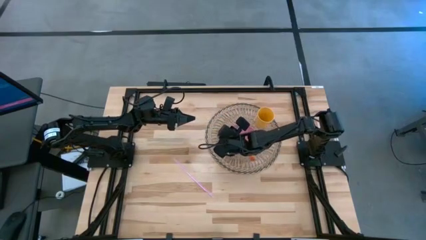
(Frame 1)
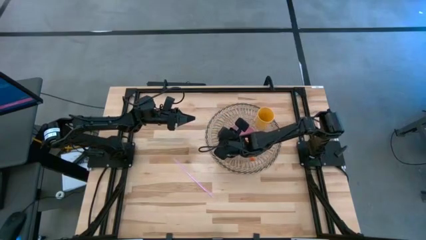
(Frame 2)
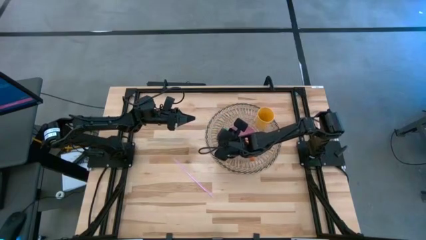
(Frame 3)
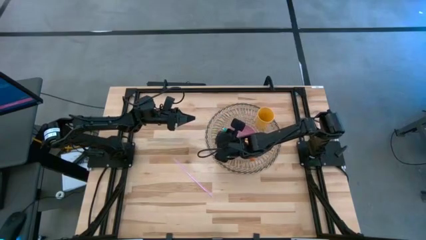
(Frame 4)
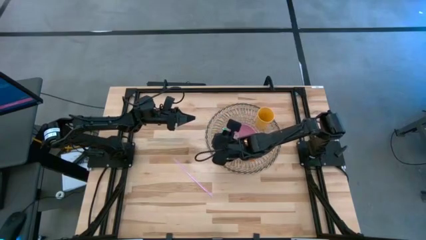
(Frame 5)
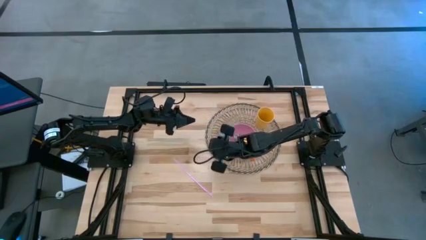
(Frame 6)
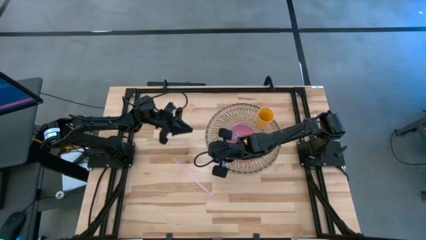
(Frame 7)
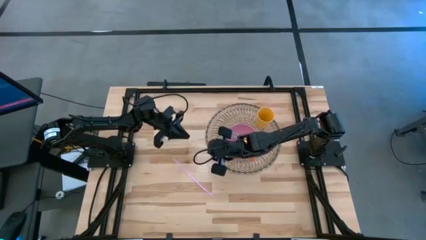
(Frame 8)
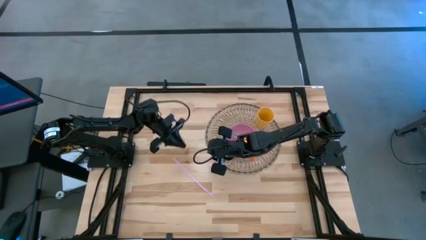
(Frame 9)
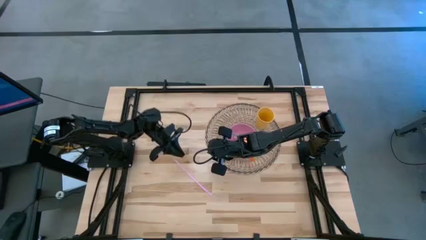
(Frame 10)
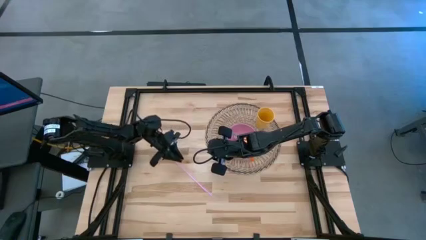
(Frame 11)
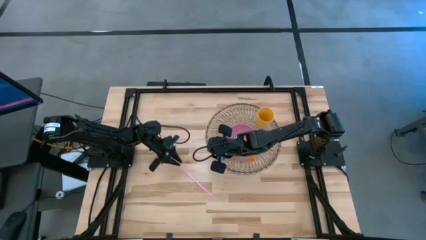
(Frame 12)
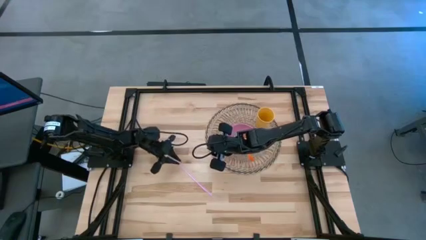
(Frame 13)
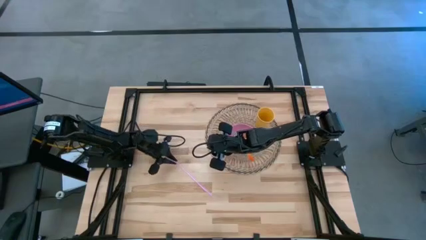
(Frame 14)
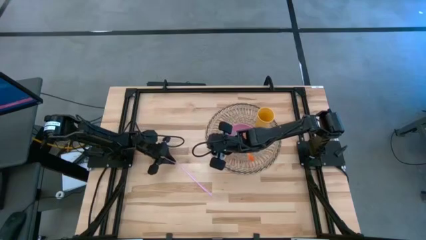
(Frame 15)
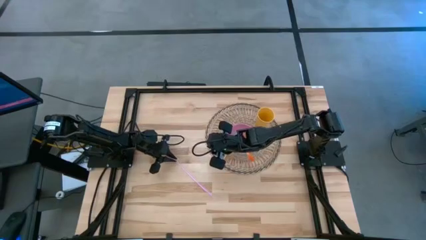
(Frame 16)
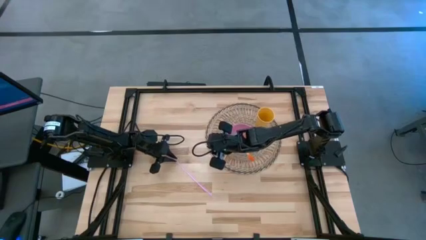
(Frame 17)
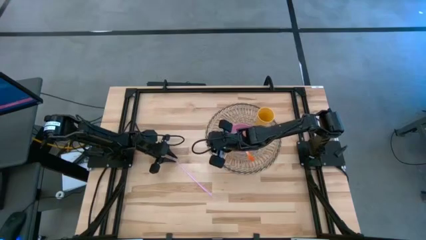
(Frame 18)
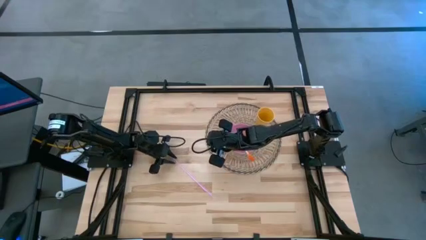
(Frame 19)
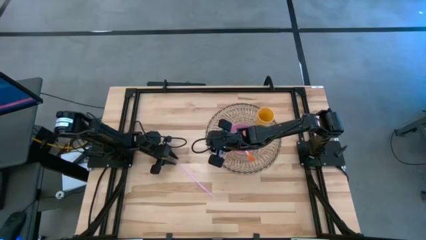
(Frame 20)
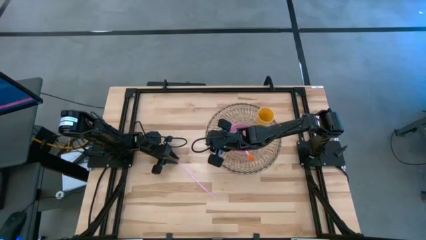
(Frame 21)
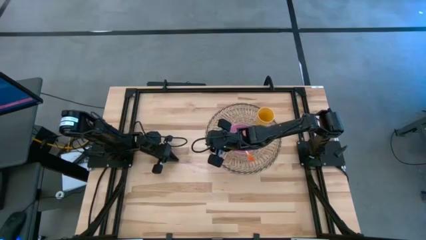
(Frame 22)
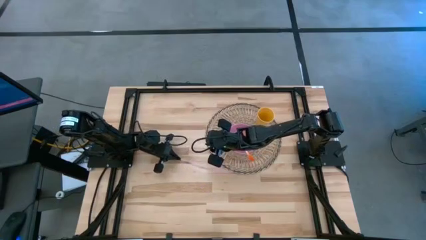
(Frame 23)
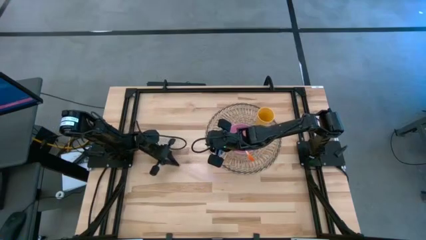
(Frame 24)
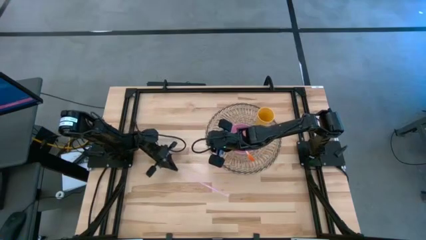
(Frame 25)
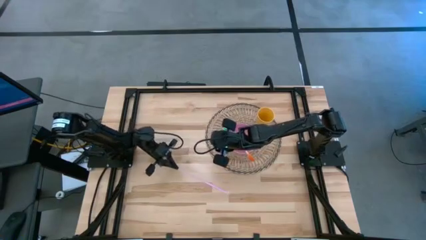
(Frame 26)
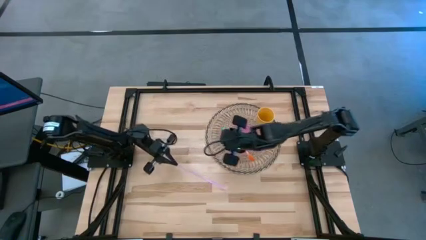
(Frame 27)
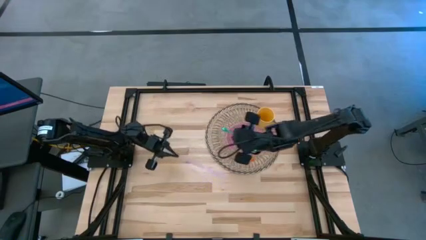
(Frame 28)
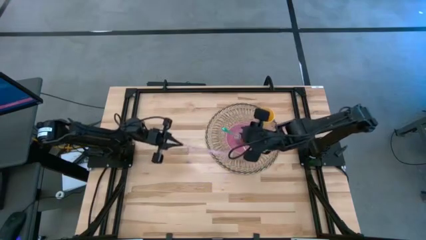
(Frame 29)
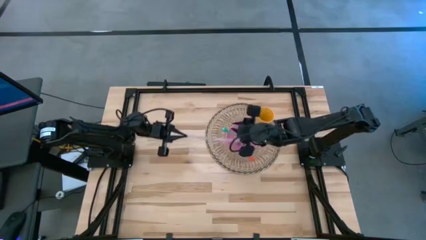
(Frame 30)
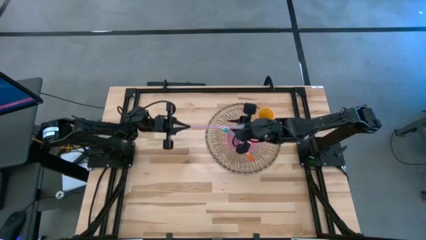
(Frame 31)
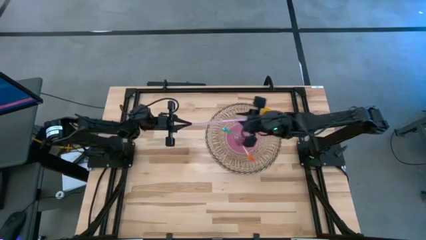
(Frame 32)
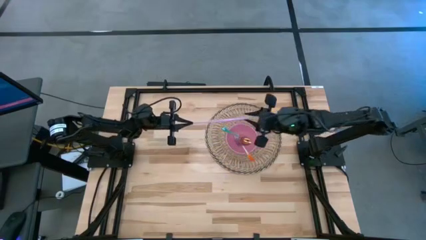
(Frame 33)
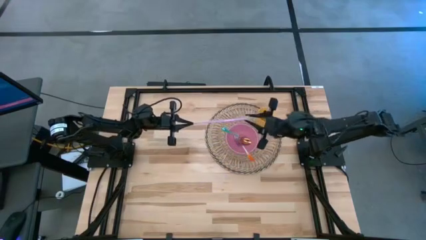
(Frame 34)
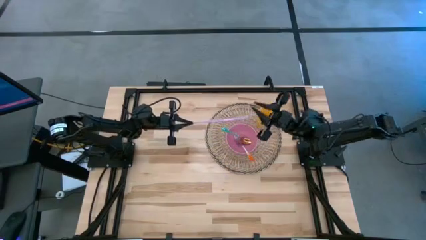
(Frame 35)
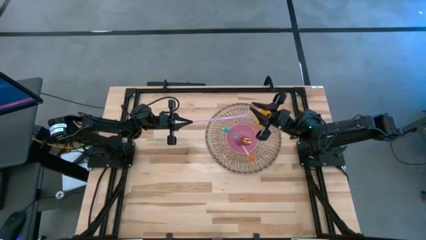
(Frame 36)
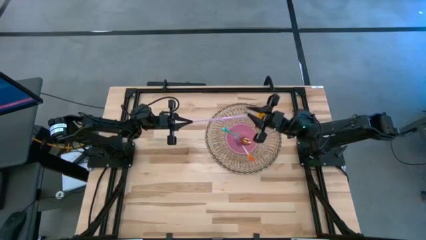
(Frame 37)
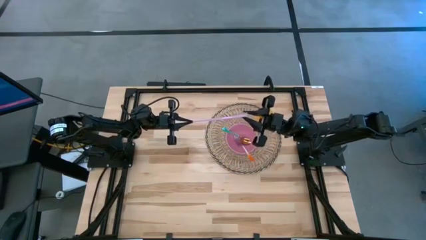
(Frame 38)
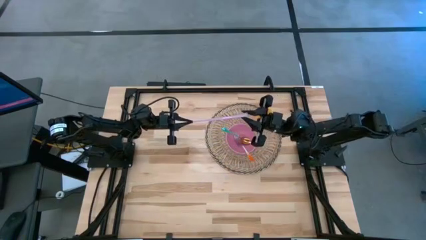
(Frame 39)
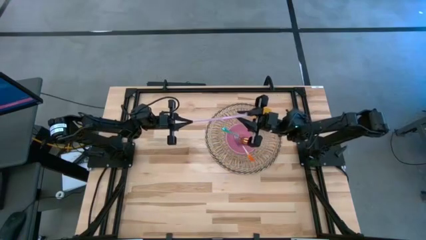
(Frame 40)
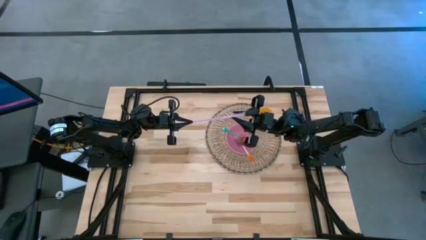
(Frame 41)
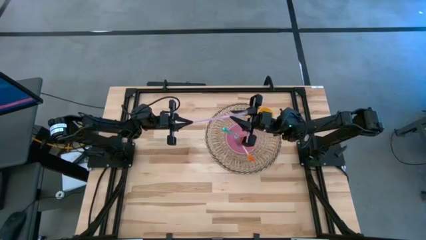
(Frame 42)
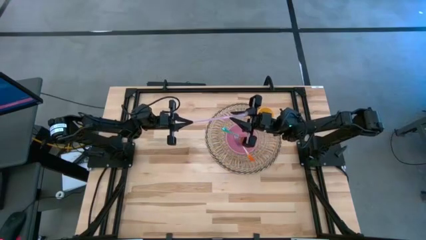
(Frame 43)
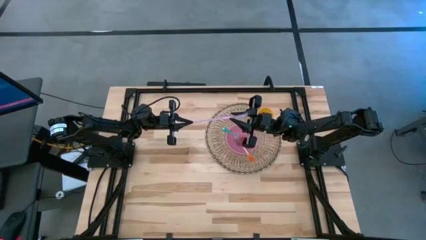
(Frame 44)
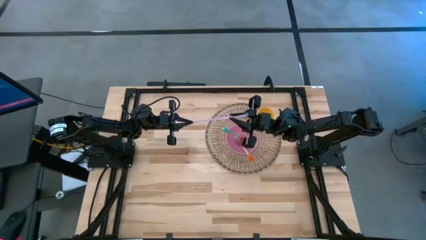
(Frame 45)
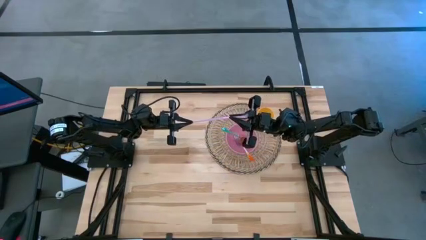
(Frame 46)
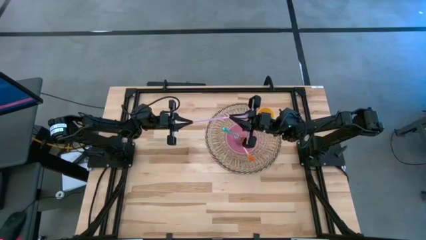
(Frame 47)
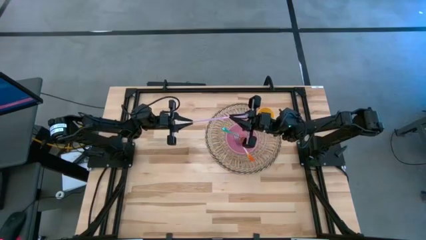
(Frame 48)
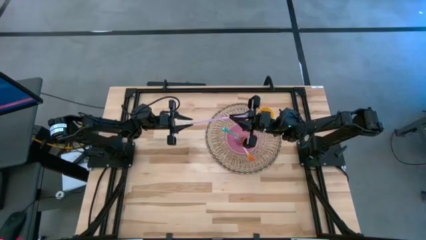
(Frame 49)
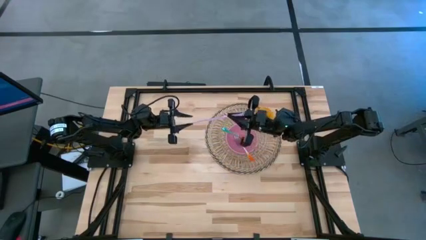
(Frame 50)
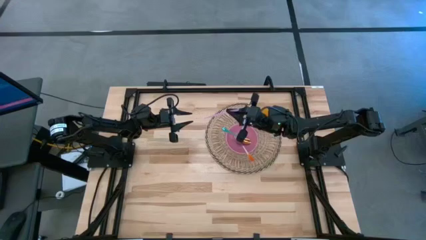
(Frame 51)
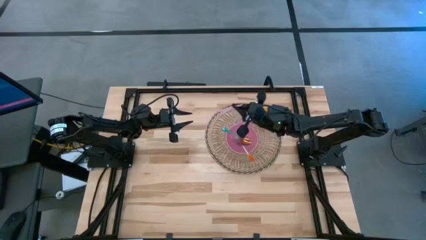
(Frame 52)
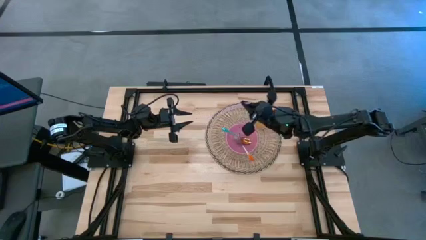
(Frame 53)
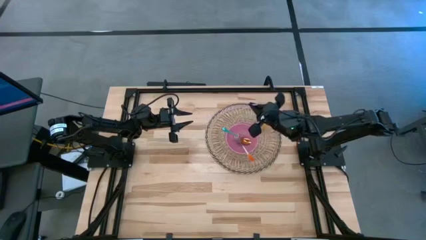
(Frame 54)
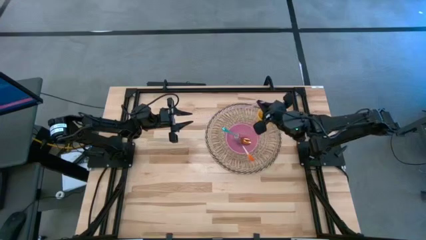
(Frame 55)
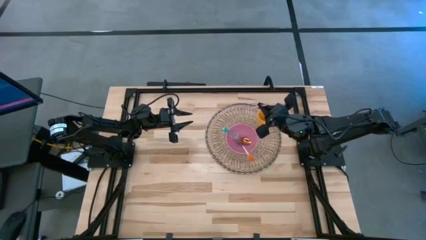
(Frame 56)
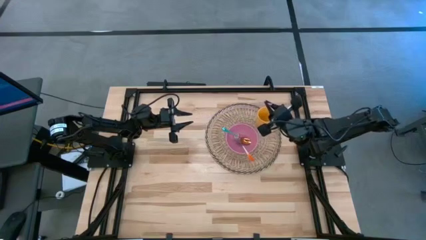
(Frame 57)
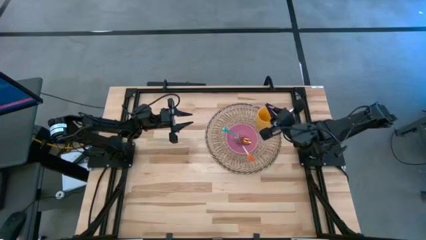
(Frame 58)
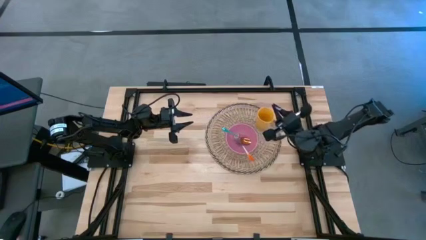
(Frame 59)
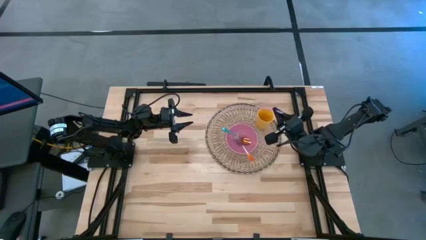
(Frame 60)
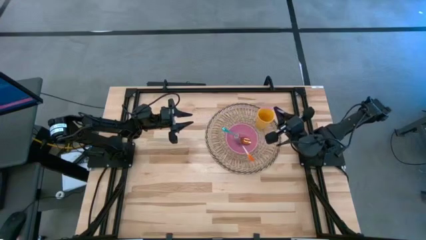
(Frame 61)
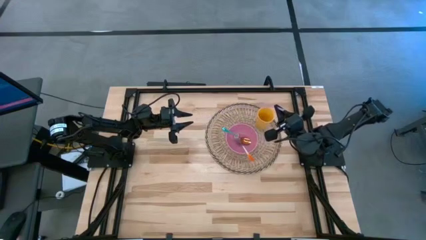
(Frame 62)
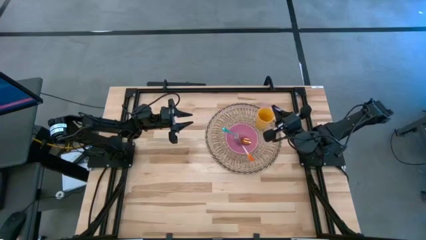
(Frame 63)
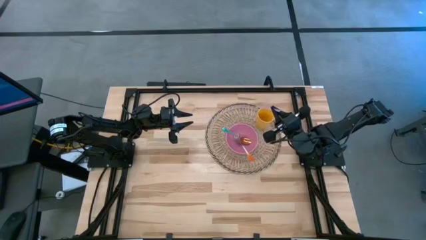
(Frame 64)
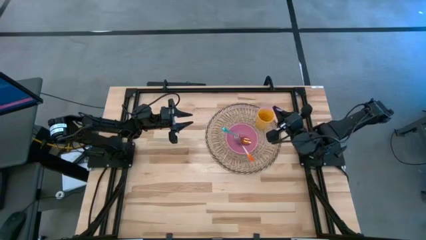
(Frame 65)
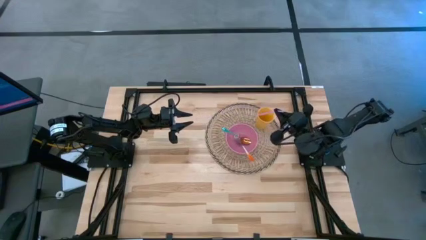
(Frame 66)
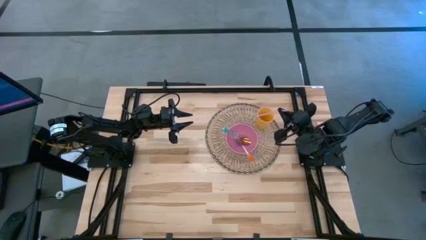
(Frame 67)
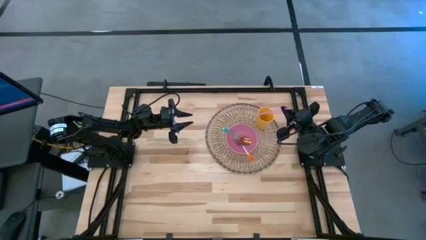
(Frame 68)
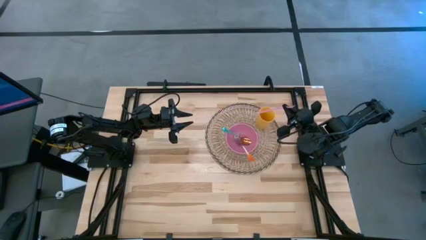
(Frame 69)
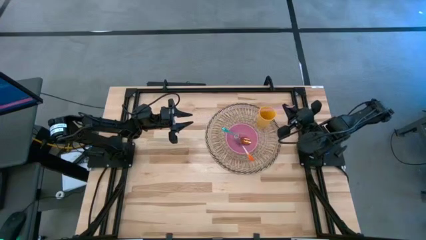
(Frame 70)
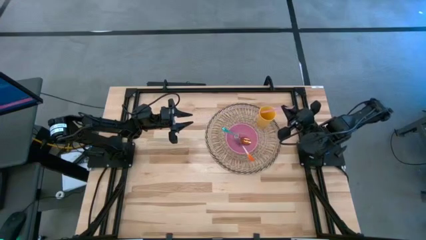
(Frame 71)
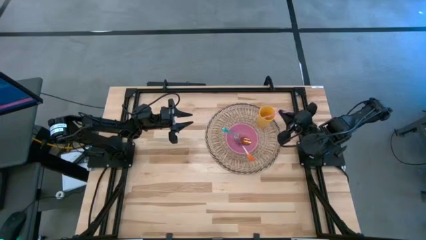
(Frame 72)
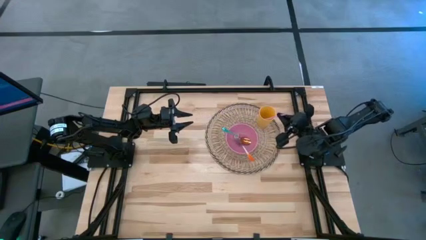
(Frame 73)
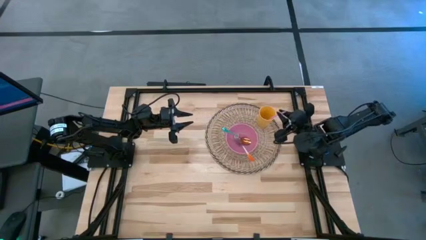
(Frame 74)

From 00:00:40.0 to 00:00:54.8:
Task: Pick & Place Utensil
Put the pink straw into the yellow cup

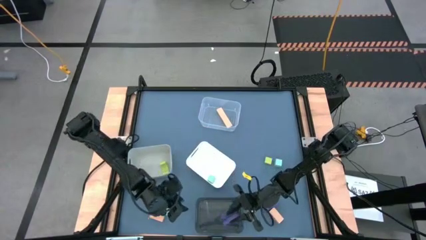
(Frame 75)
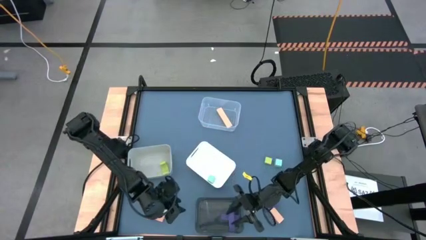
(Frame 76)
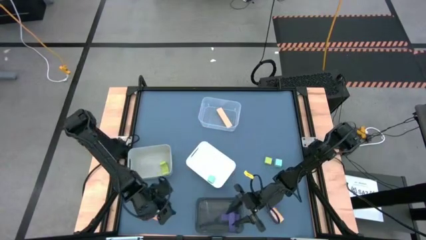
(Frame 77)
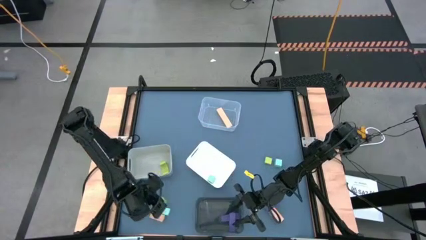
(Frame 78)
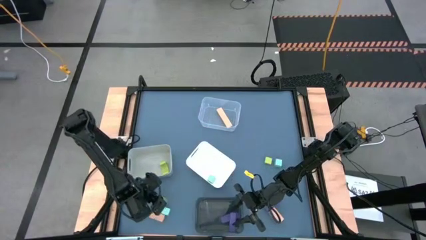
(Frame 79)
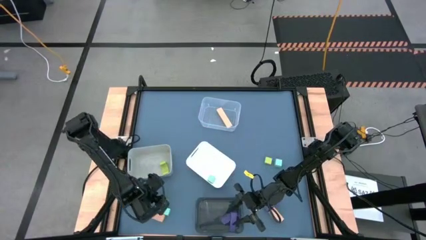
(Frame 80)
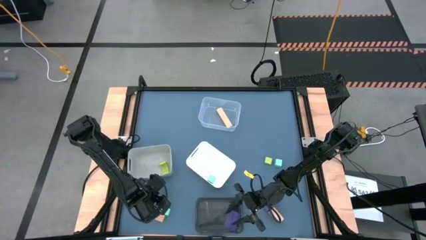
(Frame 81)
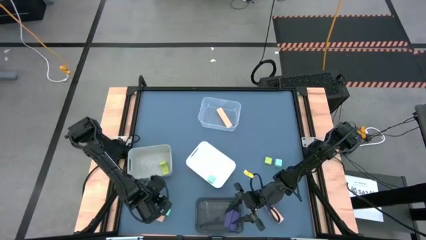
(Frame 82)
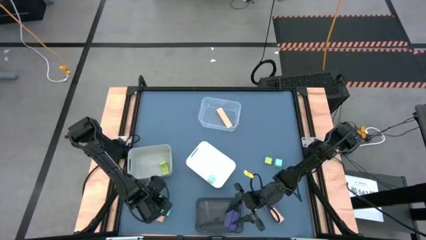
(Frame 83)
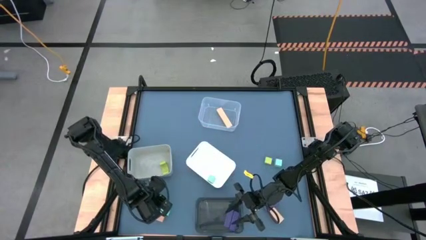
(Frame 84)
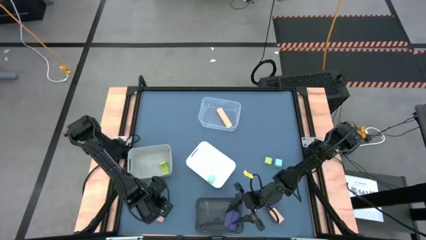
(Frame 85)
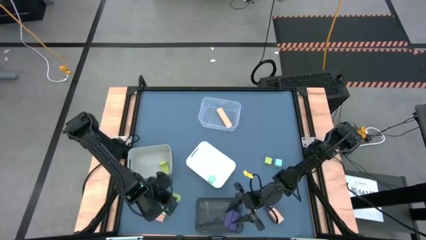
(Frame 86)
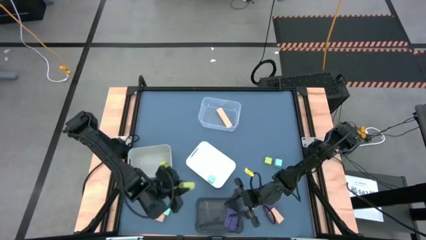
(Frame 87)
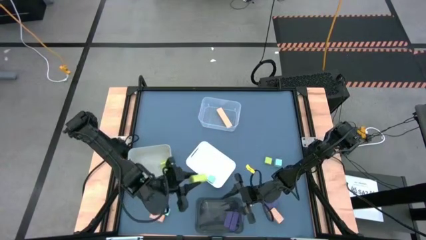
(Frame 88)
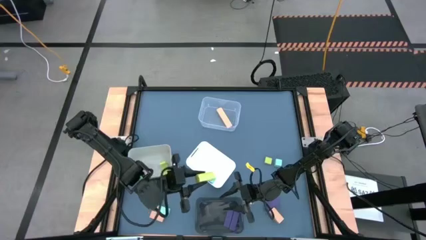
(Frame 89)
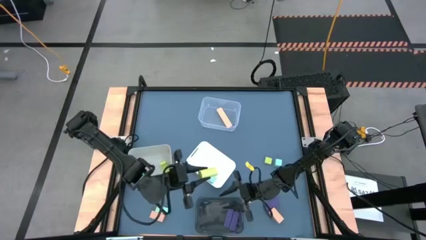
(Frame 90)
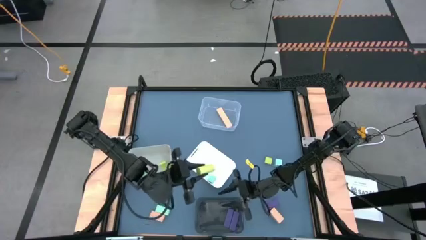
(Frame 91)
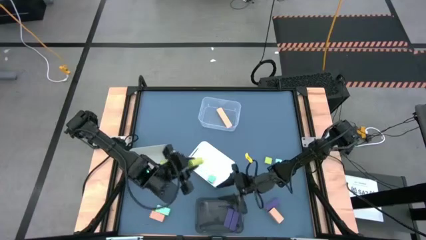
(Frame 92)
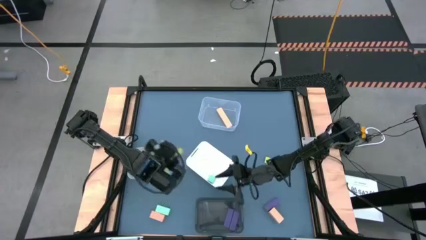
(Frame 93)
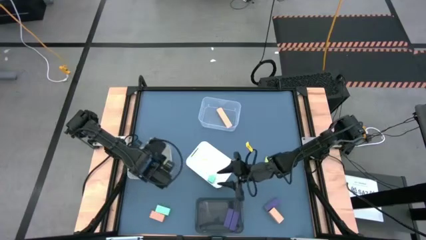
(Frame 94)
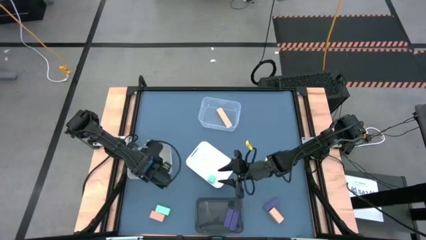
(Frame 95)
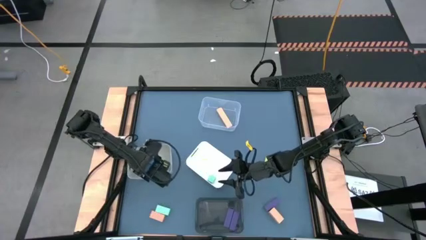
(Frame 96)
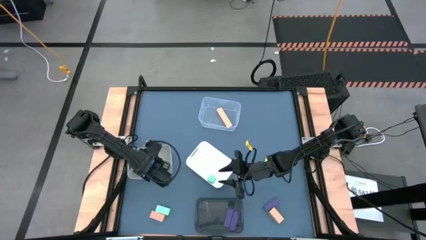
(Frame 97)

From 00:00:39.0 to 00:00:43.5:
Task: Sort & place blocks by color
Put the left green block into the gray bin
